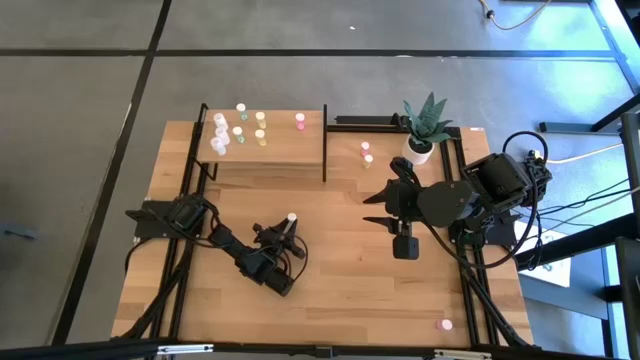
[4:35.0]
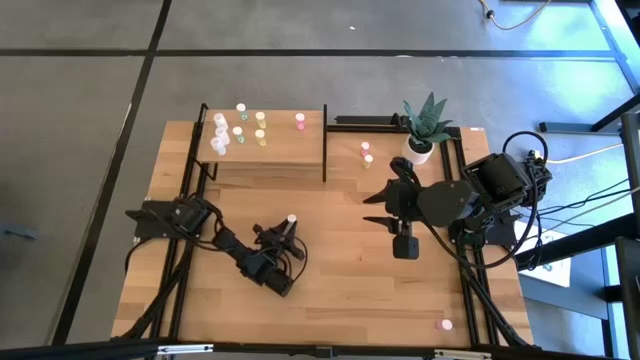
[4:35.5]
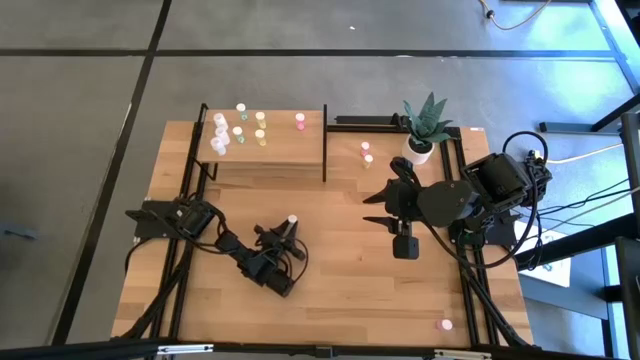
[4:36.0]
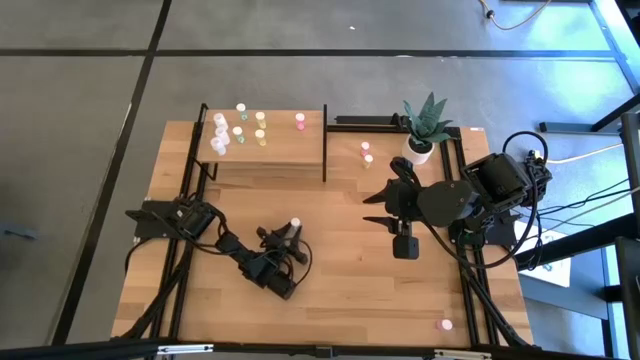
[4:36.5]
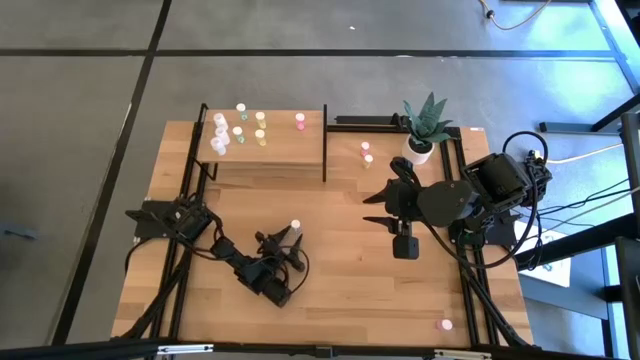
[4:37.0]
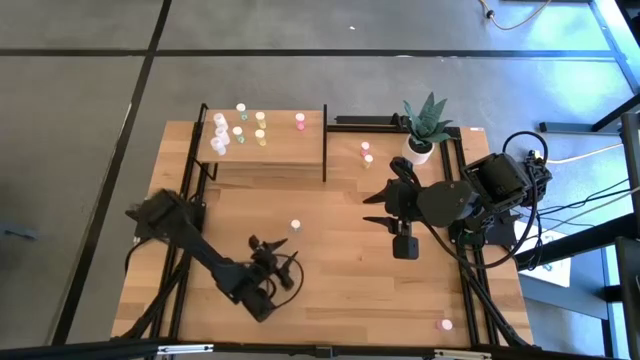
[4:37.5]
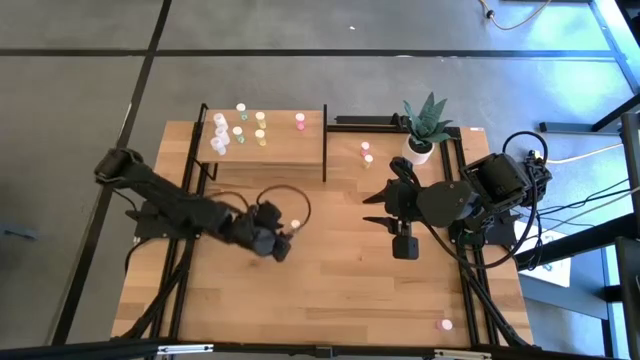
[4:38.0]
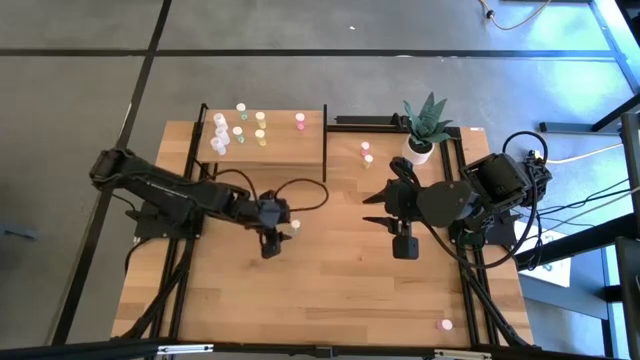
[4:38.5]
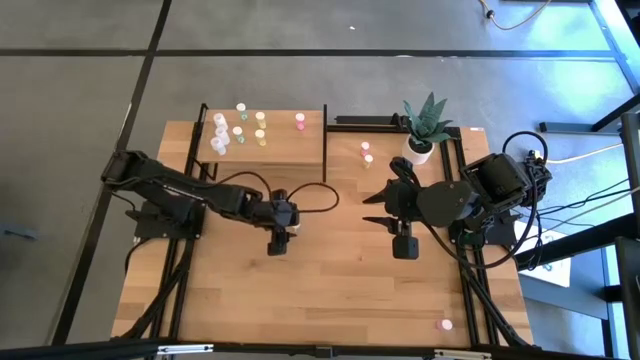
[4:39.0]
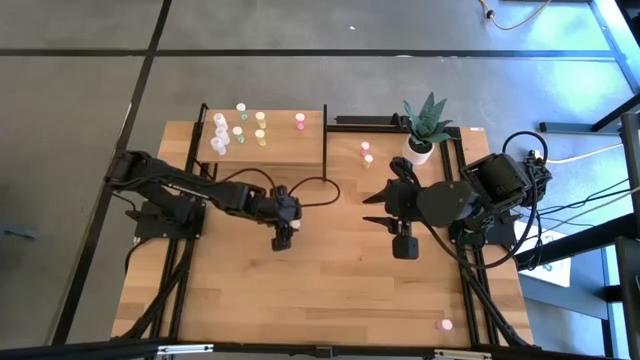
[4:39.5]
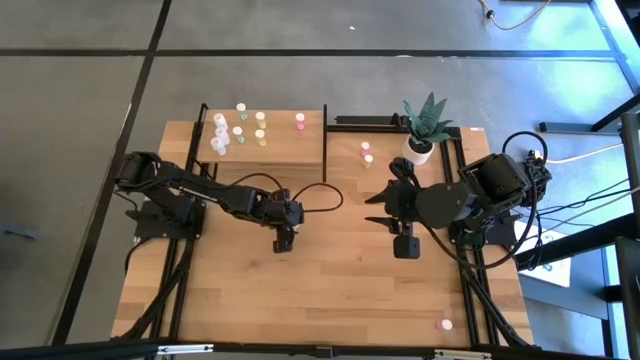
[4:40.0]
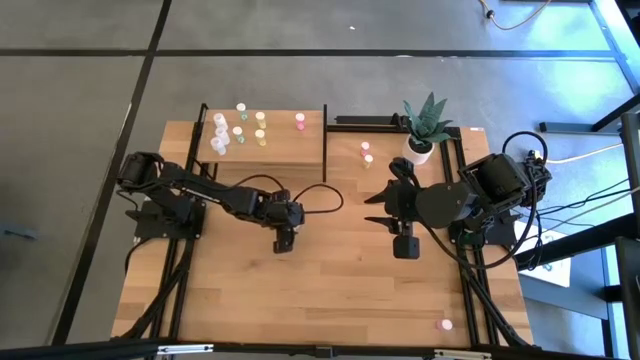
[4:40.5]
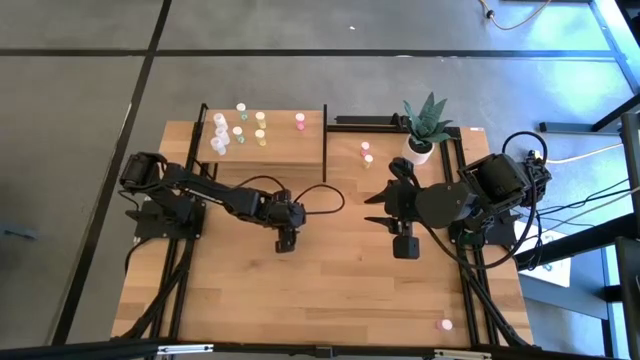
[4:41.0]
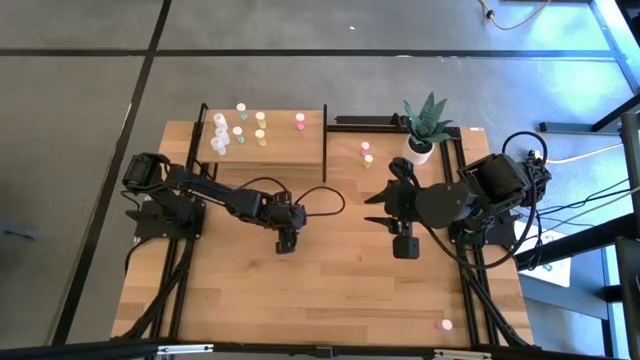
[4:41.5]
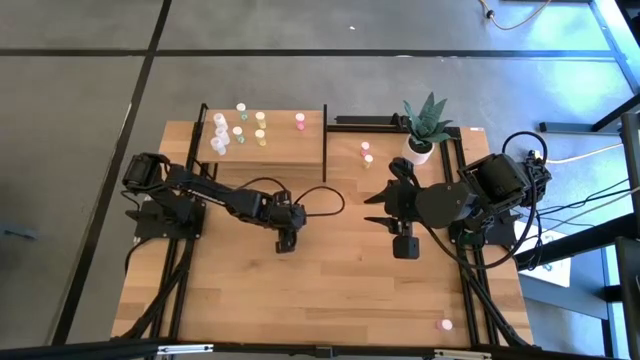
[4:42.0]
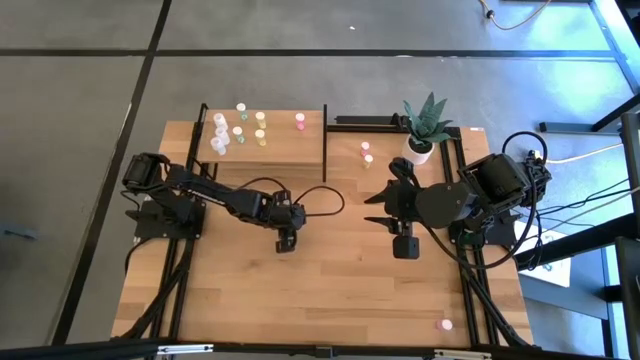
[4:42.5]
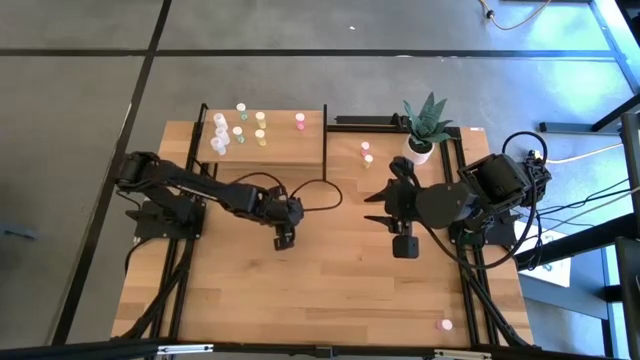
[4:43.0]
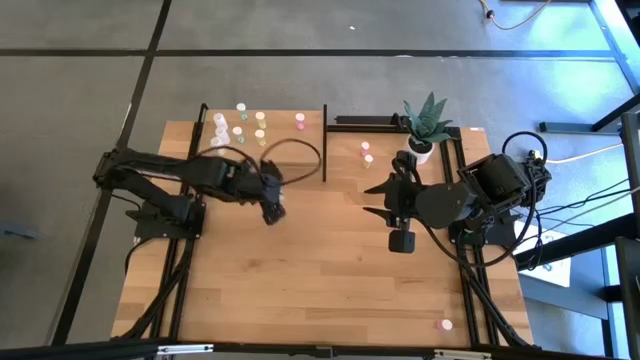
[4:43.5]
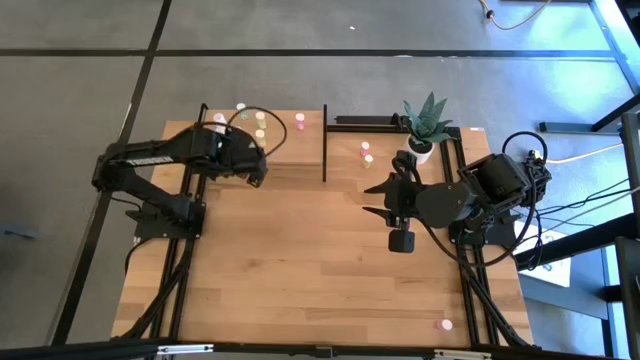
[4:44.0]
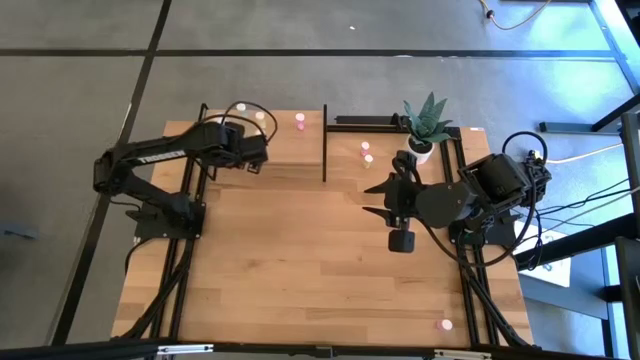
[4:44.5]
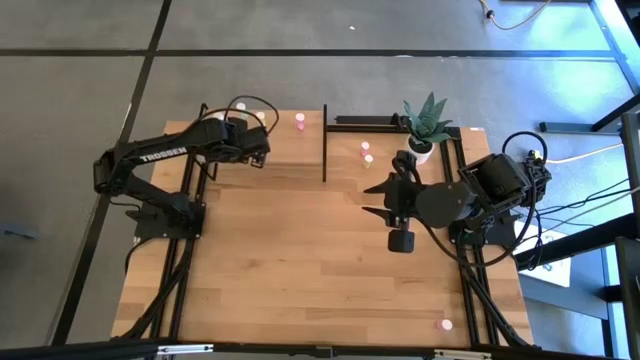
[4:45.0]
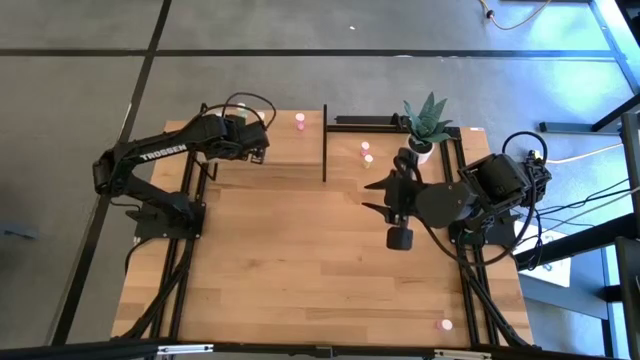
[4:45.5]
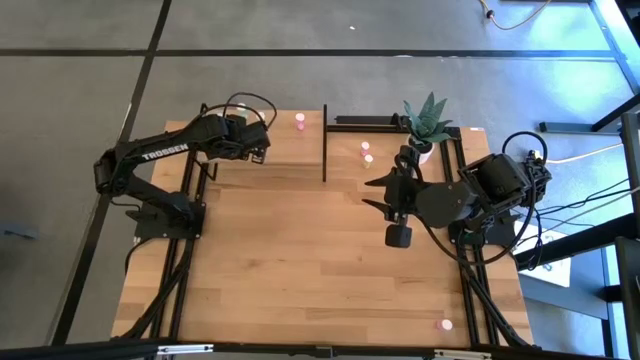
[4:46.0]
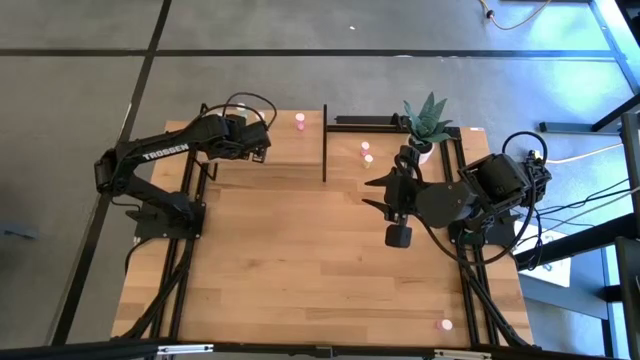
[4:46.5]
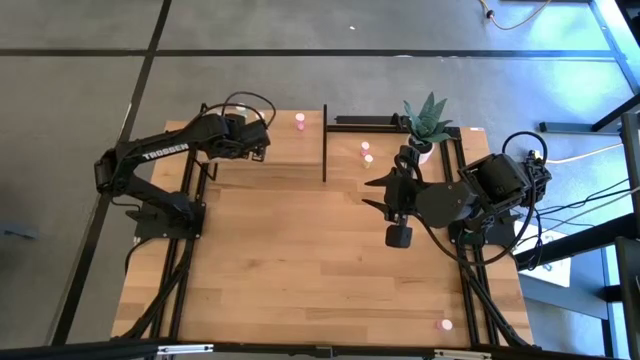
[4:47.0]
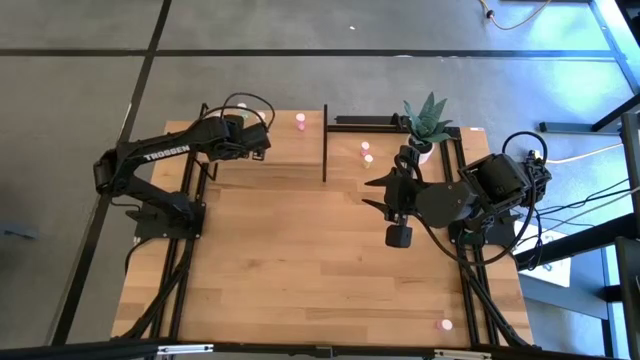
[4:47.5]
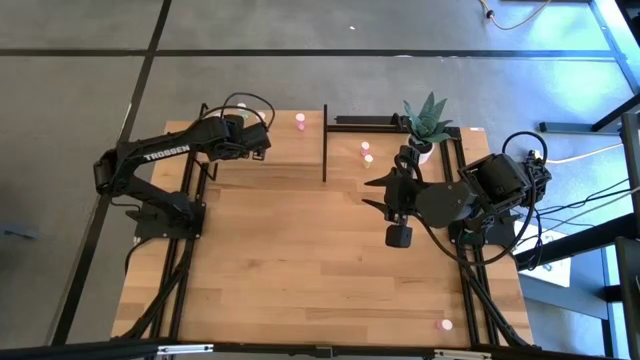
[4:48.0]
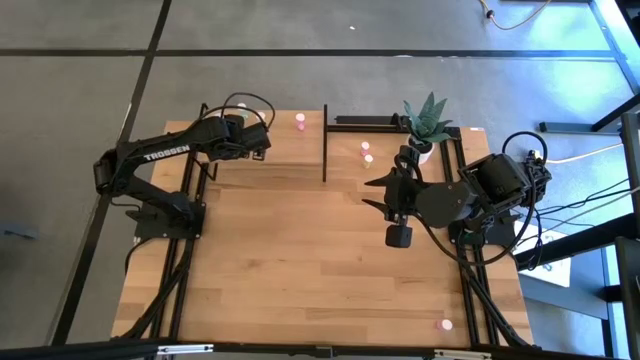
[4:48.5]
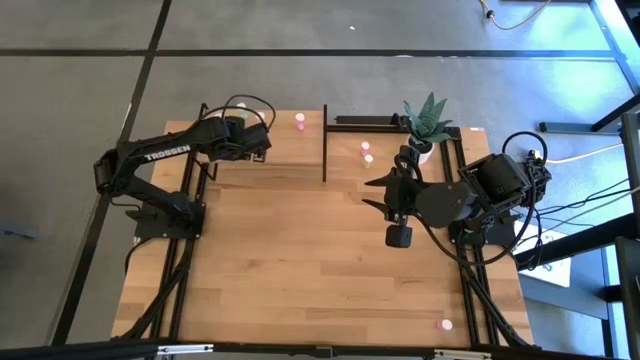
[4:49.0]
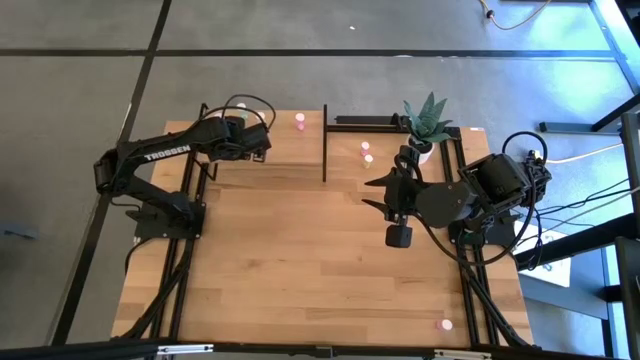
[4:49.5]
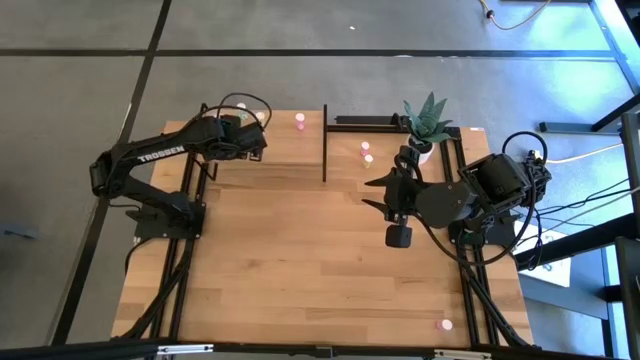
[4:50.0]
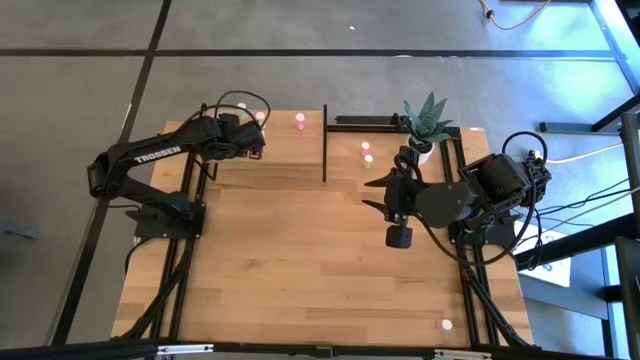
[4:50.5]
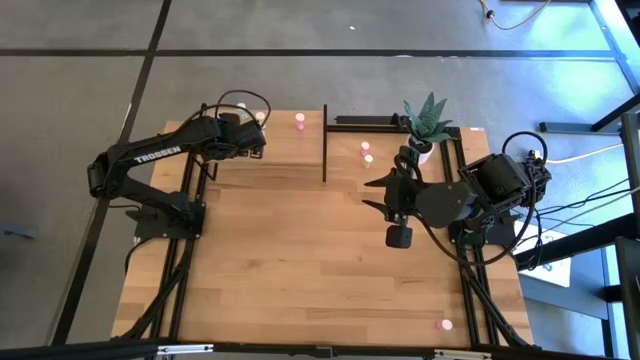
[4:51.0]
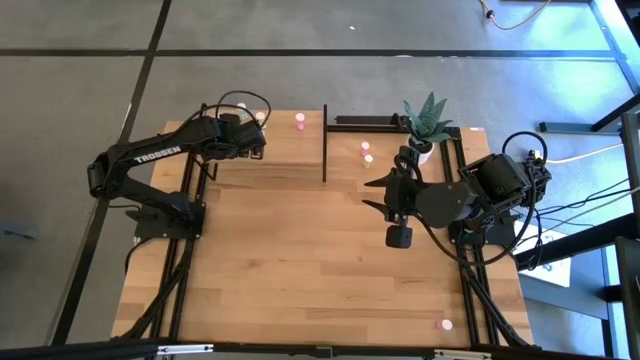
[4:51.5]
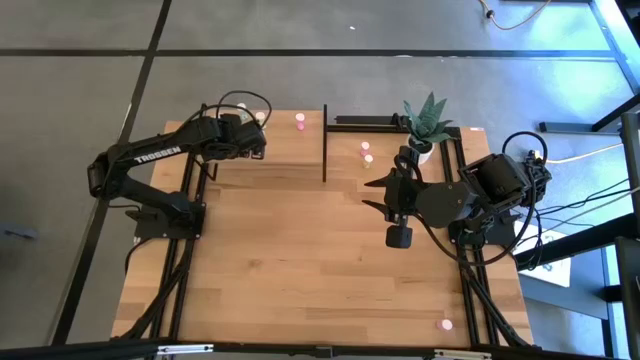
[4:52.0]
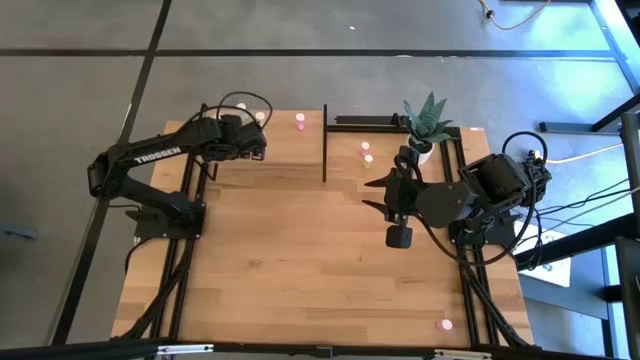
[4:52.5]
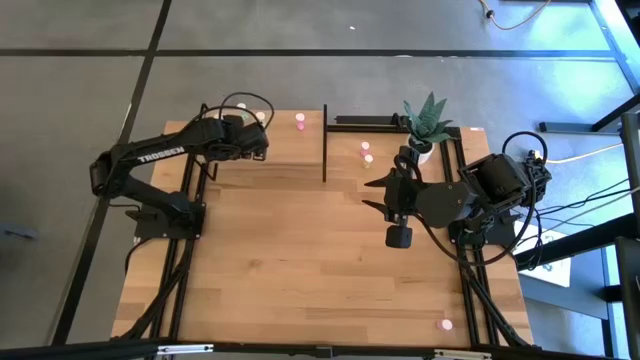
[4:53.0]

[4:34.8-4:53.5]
Task: Pick and place medicine bottles onto shelf by color
Put the blue pill bottle aligned with the other blue pill bottle on the shelf
